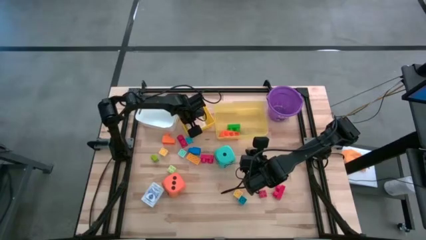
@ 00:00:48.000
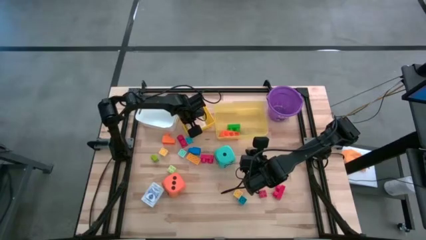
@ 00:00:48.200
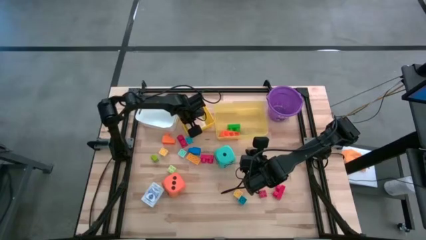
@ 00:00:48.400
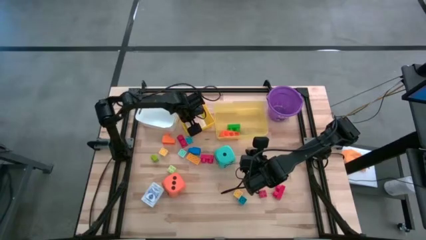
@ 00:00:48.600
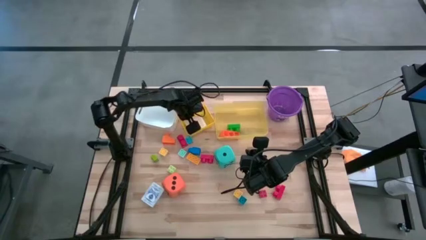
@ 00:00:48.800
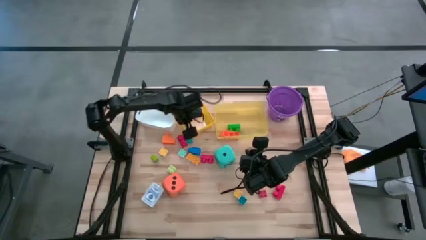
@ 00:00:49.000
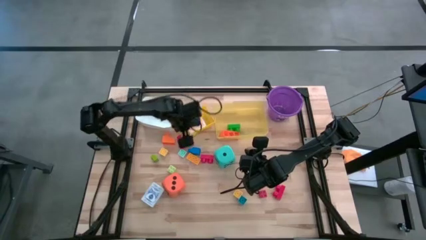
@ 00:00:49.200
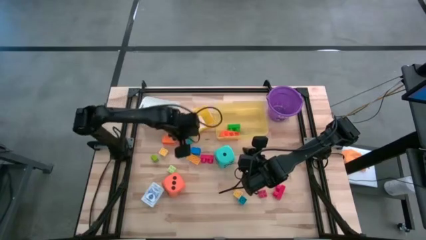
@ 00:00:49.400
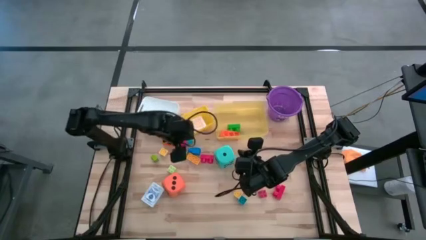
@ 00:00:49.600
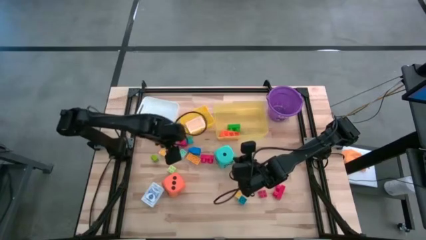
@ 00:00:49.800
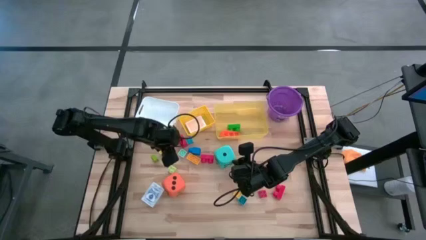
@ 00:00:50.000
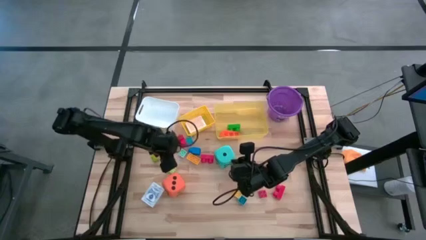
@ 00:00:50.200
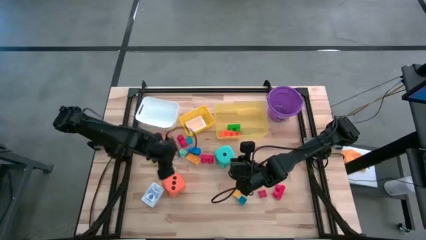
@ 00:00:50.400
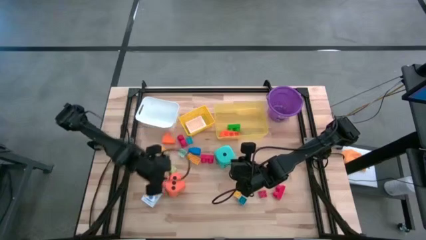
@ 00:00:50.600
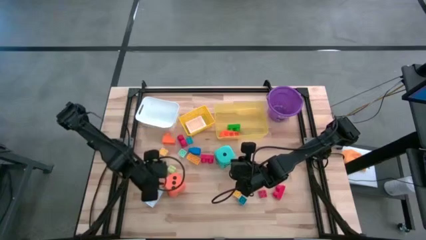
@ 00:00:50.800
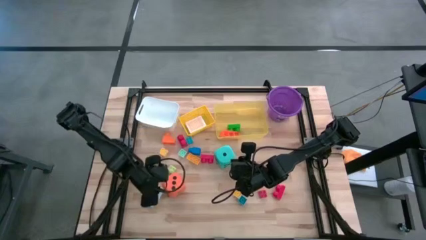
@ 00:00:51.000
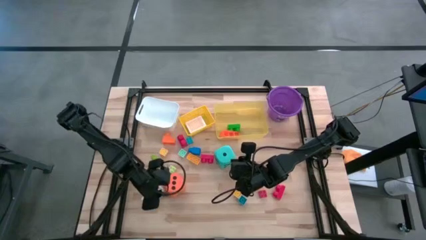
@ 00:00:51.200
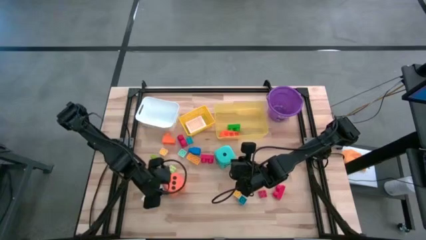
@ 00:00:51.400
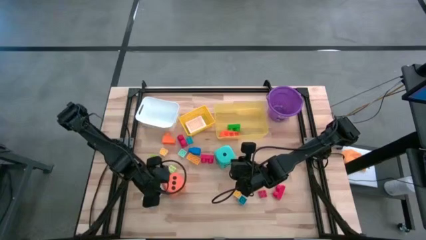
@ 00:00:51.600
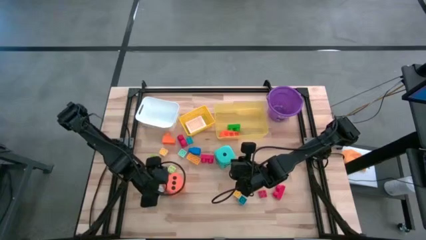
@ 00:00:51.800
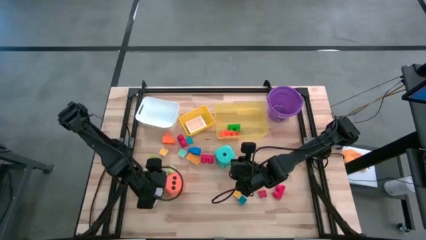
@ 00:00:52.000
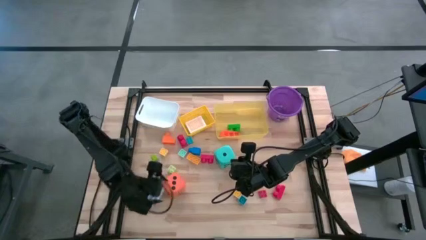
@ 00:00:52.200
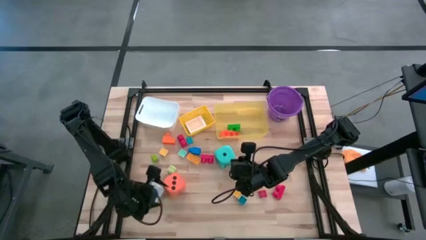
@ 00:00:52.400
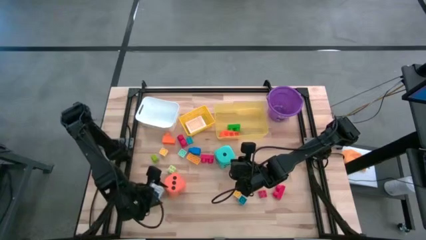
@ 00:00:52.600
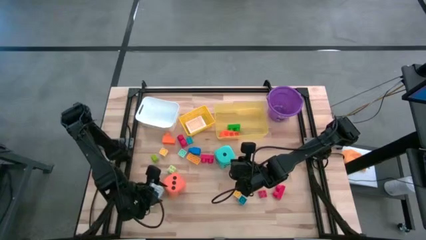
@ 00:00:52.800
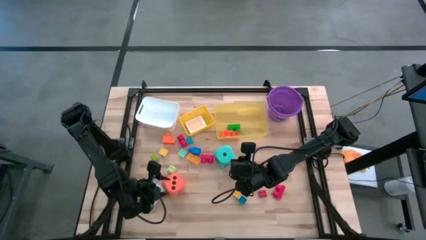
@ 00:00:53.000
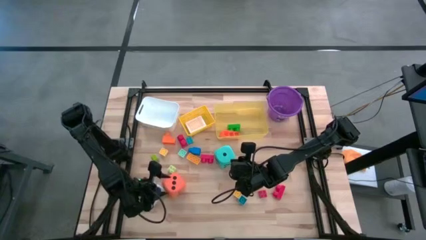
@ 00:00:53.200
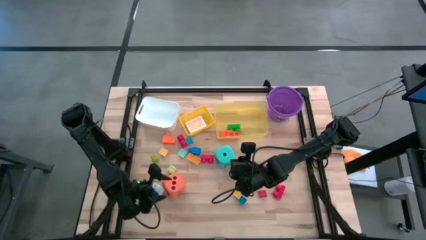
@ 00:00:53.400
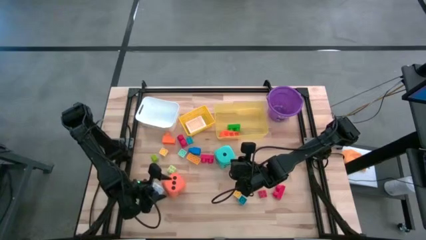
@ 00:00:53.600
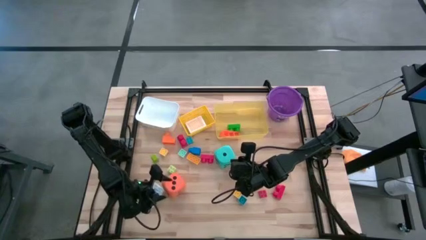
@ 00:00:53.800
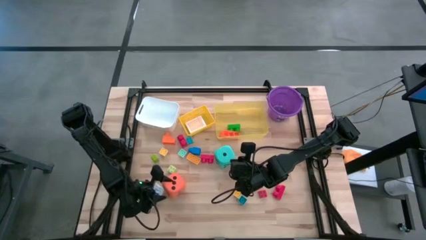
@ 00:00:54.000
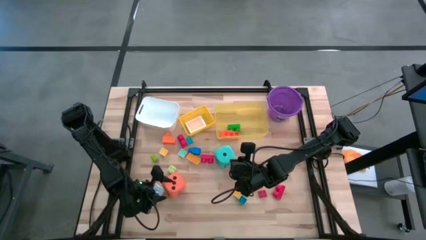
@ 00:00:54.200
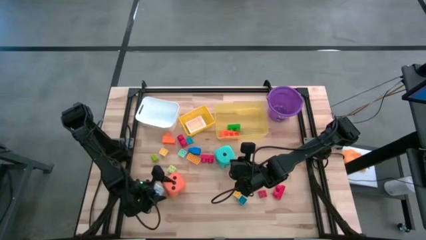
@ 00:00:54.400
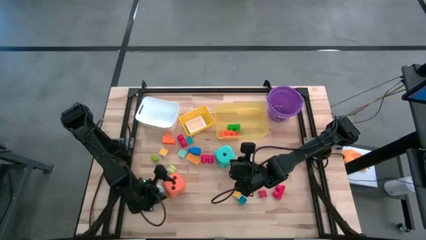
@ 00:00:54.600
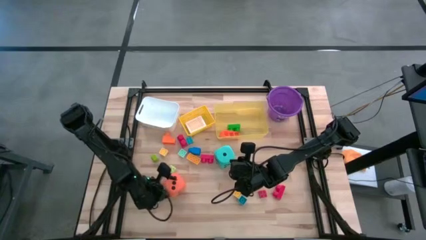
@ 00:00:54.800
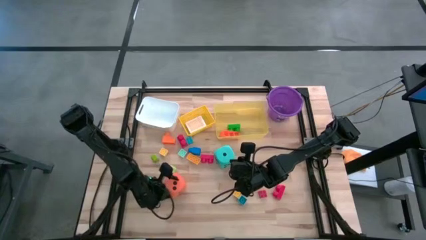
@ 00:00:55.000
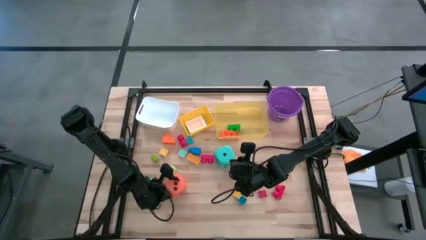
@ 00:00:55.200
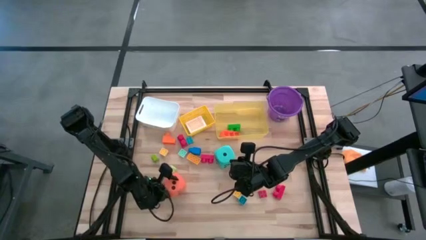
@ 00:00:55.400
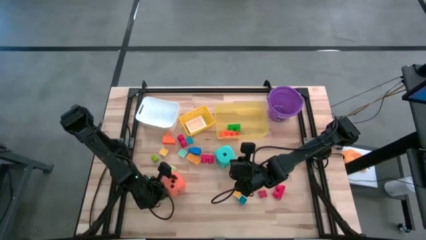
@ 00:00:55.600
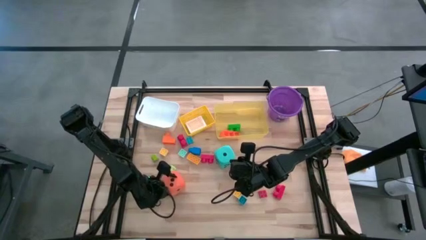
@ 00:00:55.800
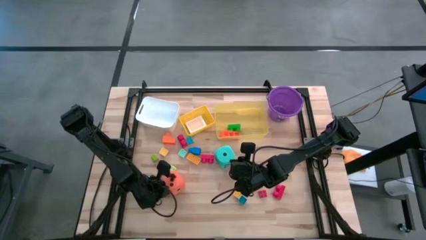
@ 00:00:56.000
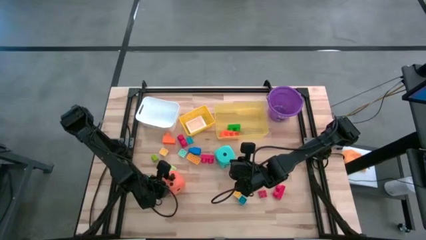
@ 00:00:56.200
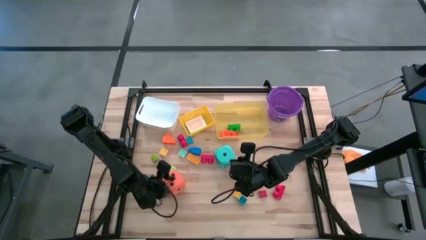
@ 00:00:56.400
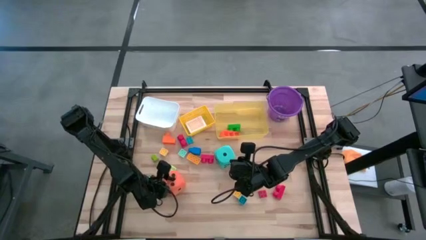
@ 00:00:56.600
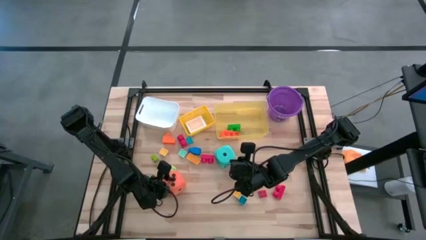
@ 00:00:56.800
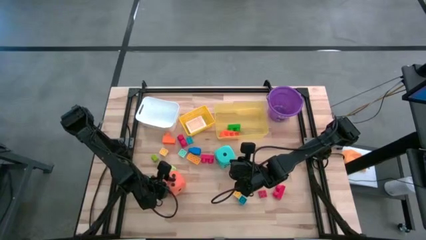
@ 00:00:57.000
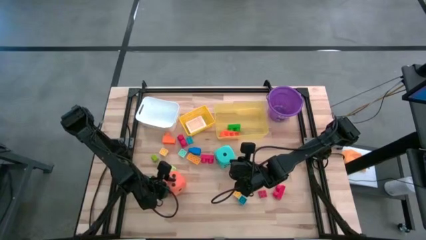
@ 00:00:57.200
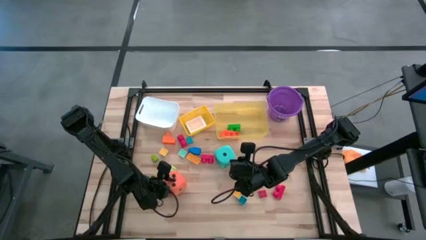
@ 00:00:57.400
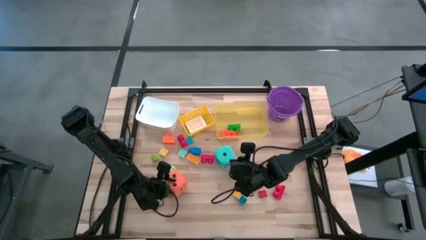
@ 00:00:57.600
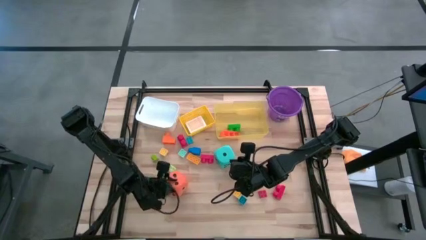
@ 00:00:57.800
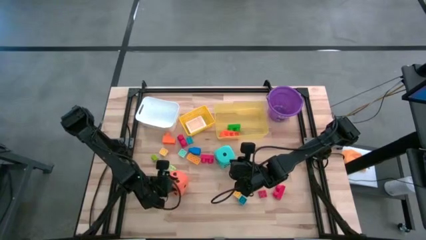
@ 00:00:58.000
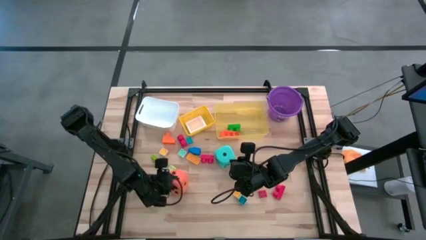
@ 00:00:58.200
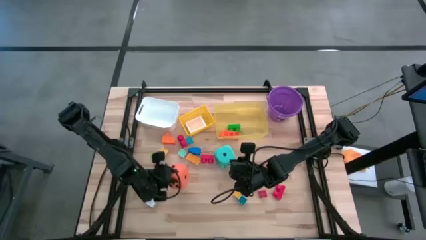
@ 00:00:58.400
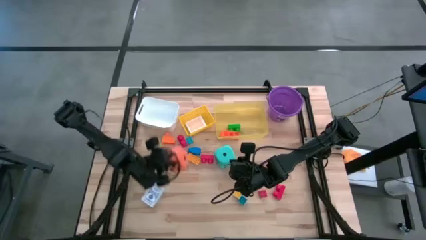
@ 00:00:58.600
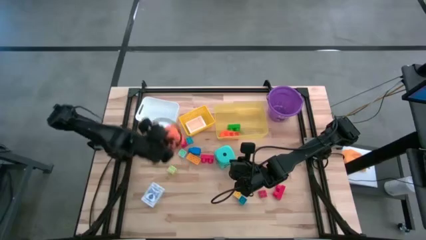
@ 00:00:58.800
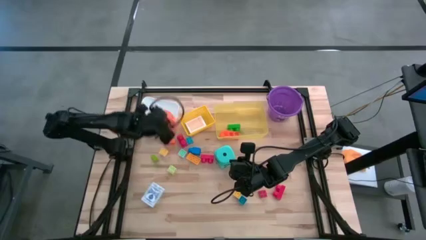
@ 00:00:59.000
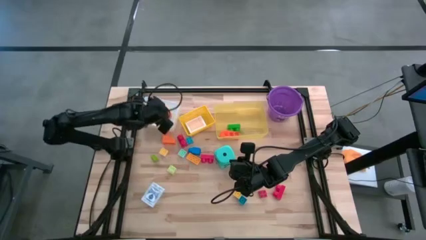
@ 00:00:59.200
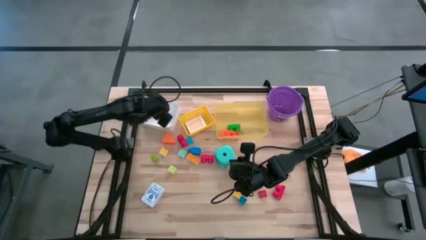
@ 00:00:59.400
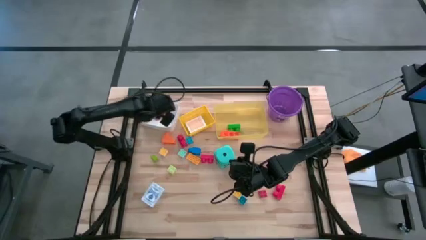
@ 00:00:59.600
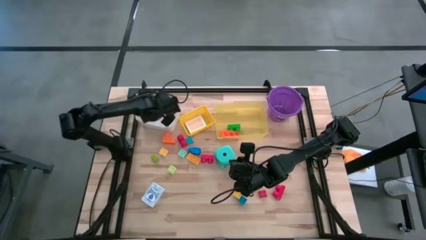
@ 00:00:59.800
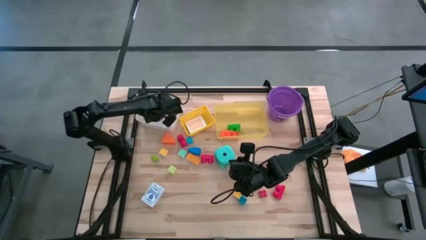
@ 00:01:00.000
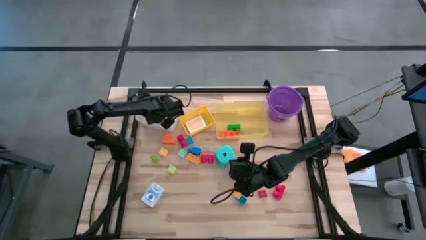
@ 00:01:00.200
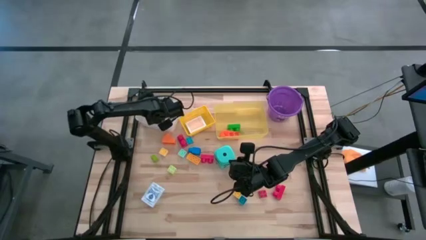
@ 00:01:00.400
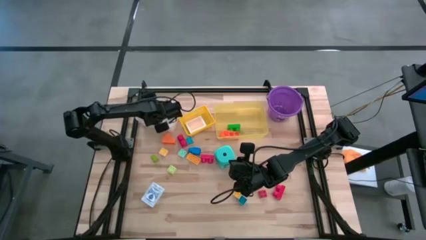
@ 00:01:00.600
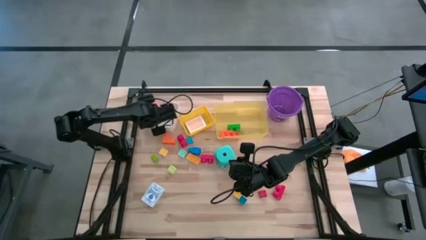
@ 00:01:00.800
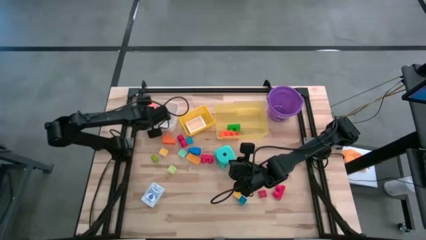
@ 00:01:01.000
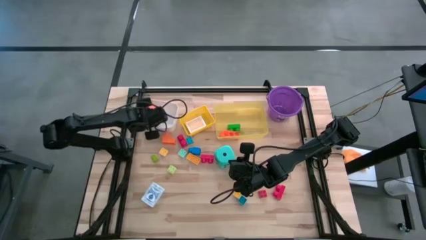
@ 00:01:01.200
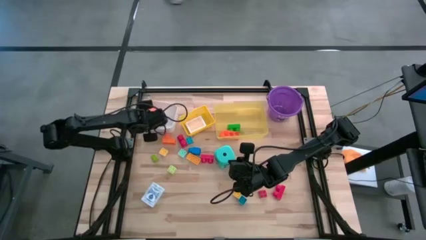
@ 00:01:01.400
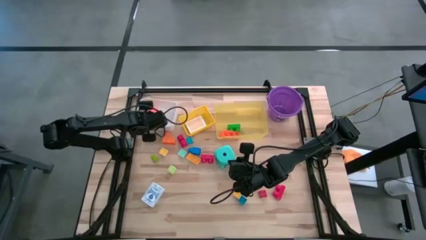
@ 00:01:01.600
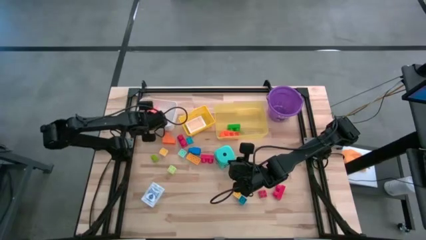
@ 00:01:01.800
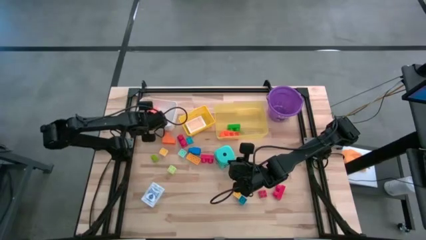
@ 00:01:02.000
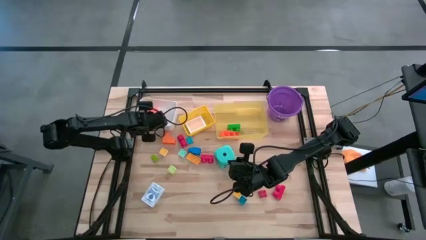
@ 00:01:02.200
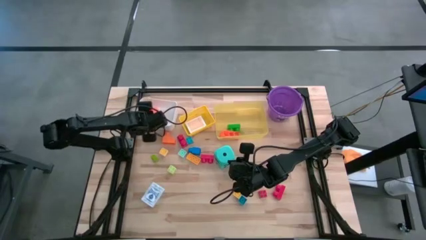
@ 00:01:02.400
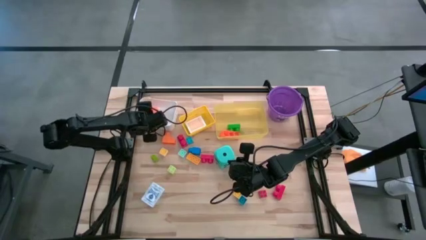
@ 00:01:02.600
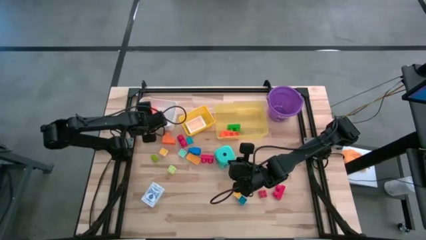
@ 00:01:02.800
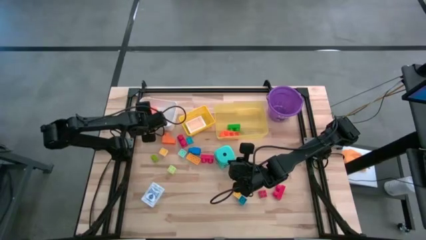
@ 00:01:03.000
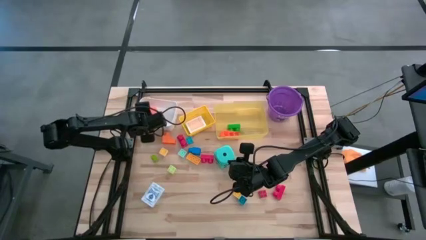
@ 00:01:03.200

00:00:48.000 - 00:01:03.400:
Task: Pick & Place Toys
Put the orange dice into the white bin

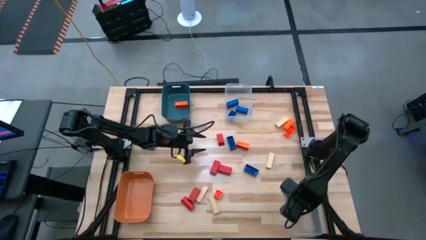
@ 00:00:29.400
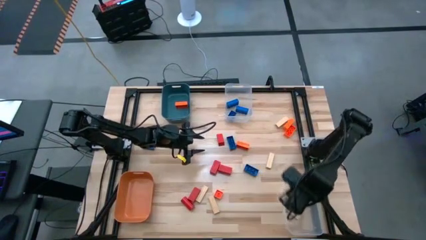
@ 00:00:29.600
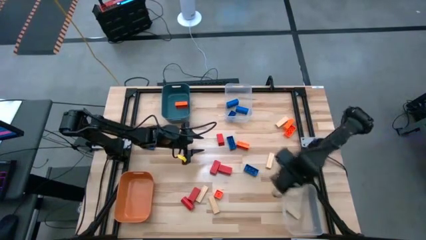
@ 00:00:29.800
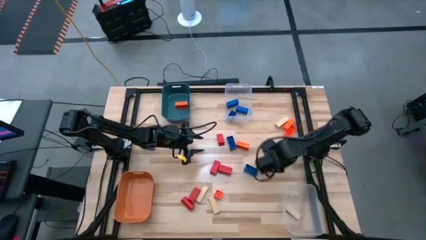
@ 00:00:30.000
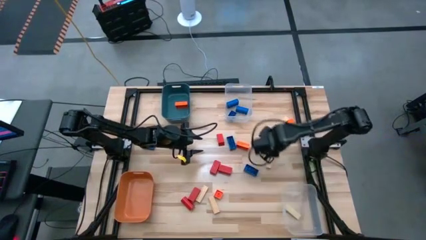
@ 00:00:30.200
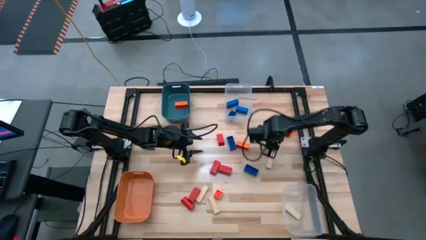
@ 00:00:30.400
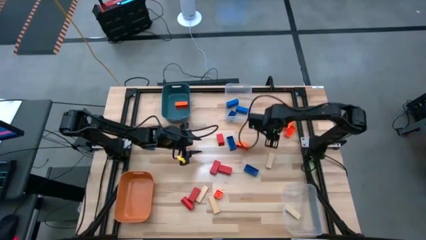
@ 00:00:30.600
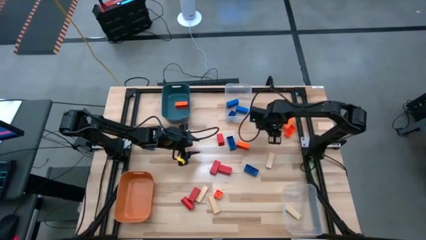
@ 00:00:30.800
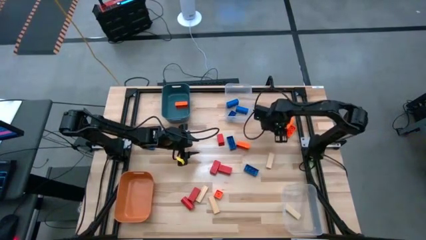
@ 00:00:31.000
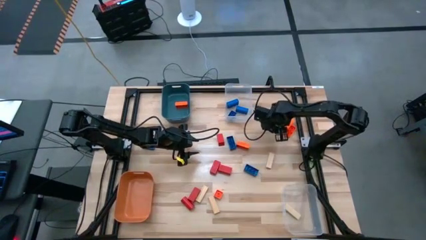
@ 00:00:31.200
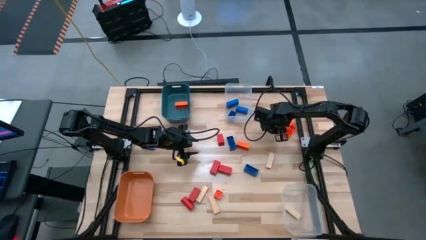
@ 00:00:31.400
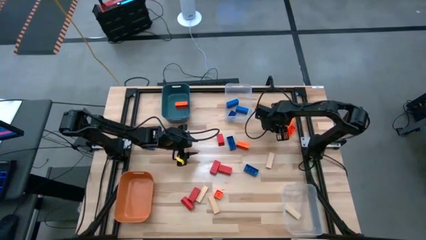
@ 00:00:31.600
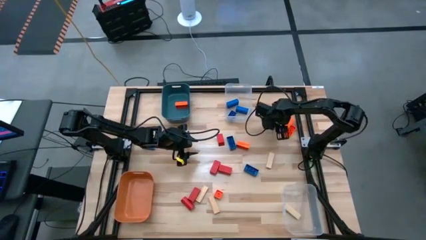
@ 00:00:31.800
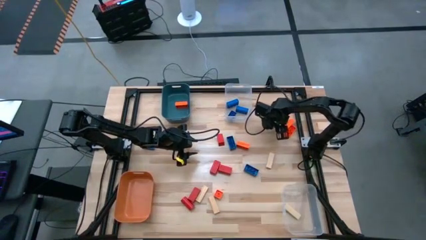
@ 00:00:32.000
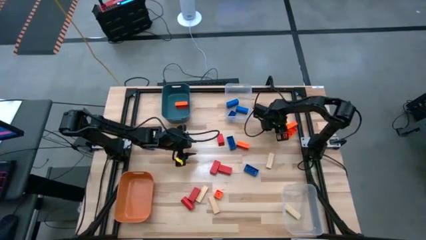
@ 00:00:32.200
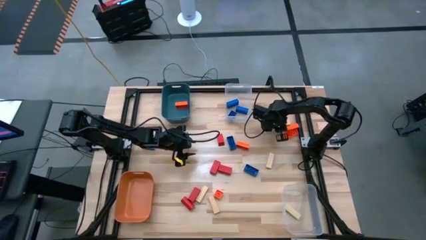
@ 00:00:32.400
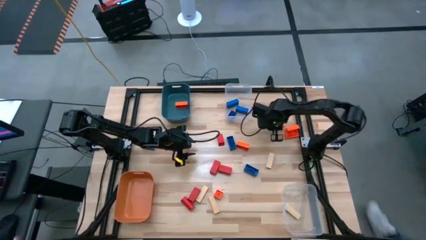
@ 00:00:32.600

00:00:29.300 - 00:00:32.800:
Task: Sort blocks
Put the brown block into the bottom transparent bin
